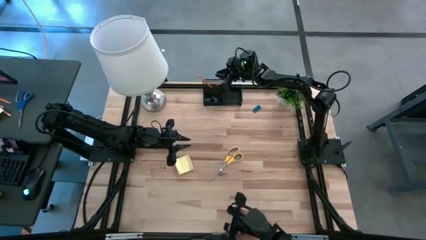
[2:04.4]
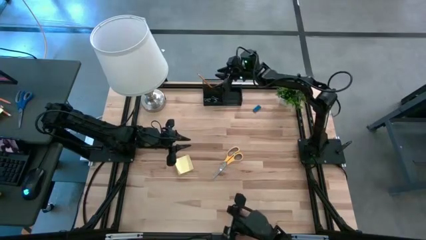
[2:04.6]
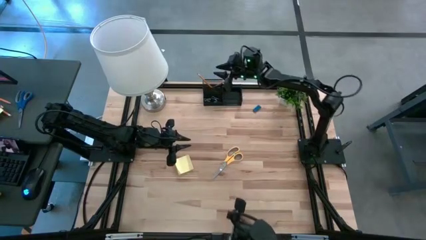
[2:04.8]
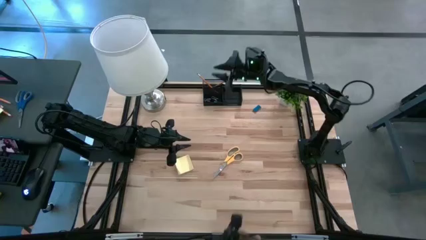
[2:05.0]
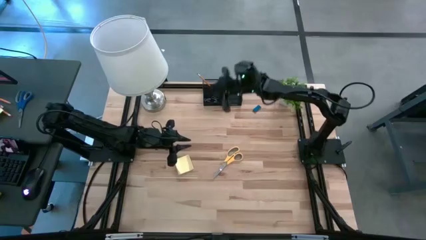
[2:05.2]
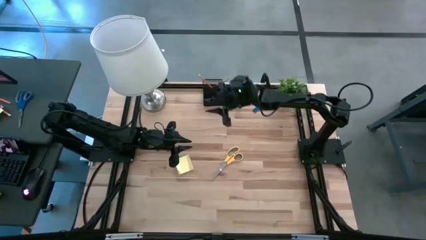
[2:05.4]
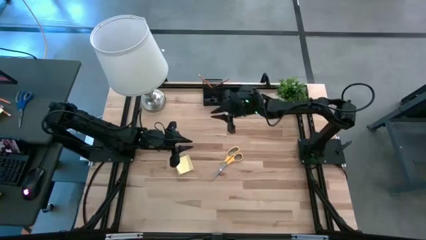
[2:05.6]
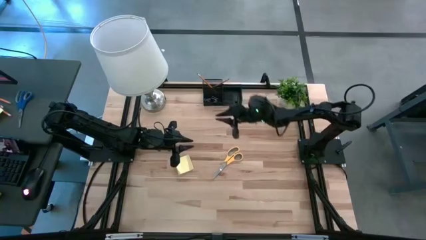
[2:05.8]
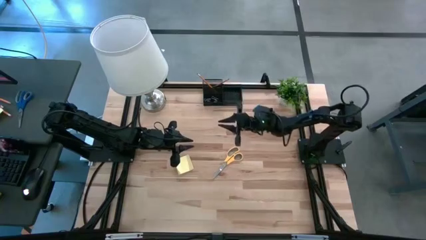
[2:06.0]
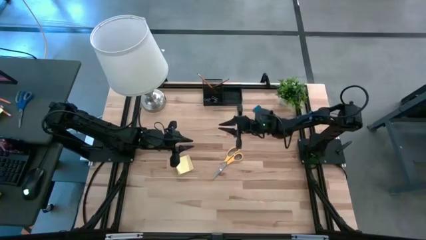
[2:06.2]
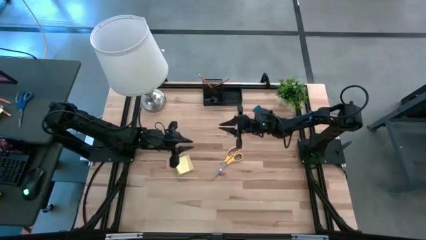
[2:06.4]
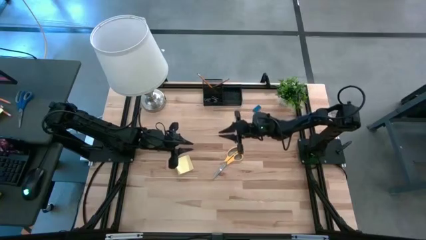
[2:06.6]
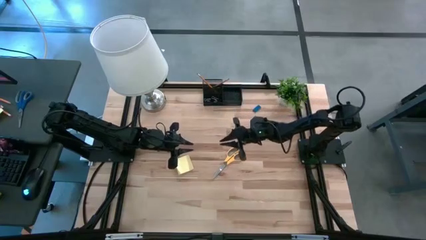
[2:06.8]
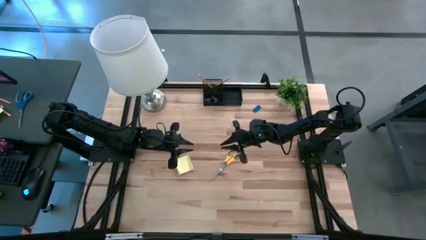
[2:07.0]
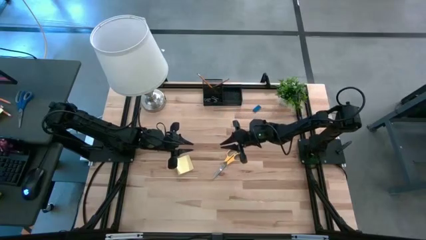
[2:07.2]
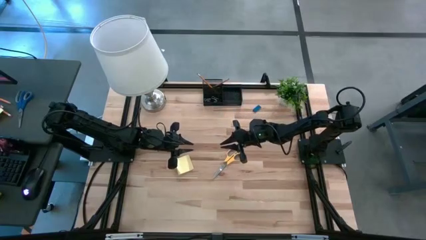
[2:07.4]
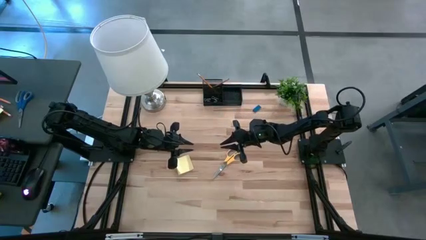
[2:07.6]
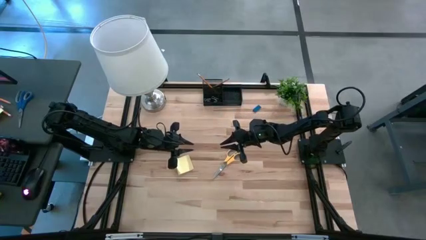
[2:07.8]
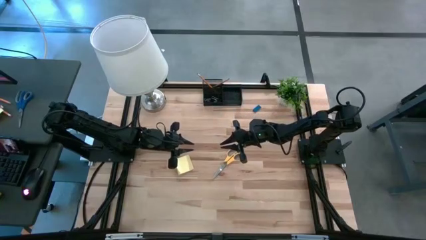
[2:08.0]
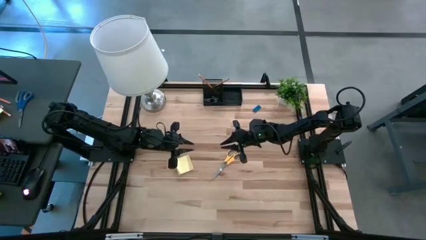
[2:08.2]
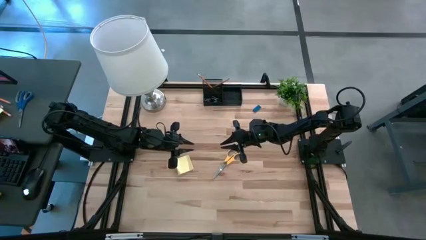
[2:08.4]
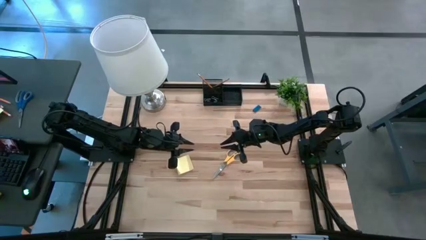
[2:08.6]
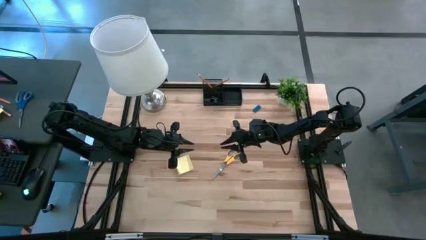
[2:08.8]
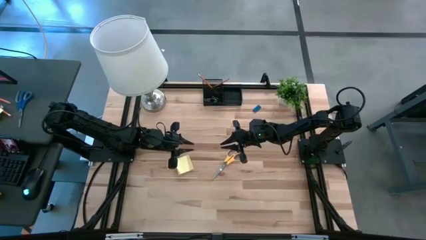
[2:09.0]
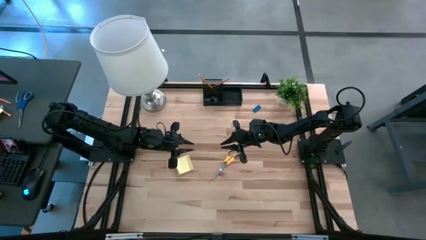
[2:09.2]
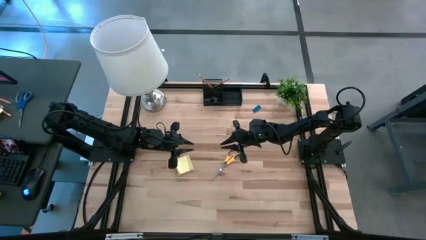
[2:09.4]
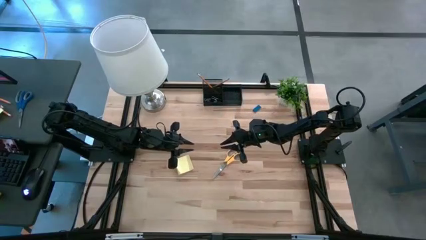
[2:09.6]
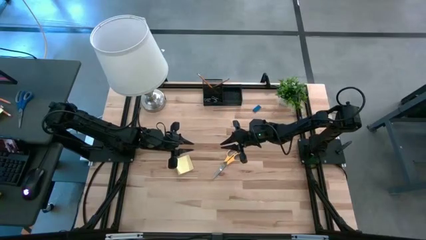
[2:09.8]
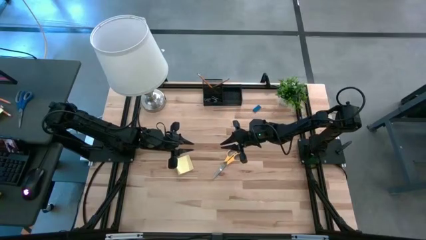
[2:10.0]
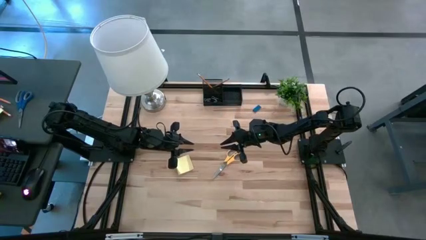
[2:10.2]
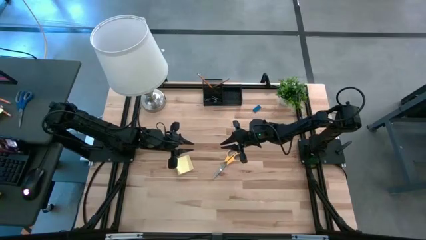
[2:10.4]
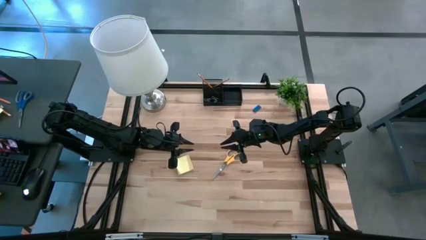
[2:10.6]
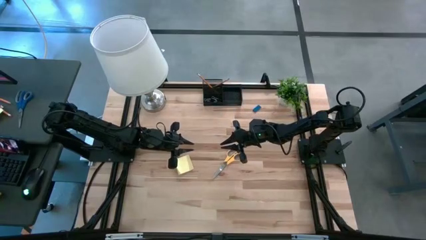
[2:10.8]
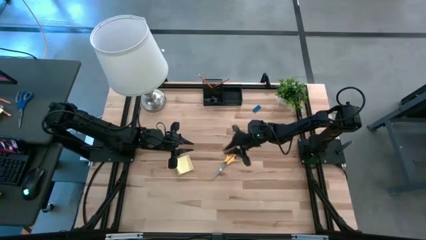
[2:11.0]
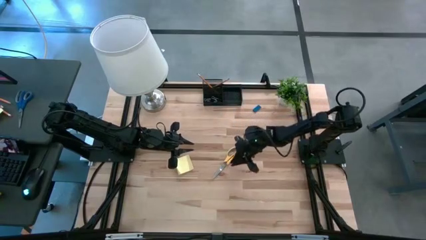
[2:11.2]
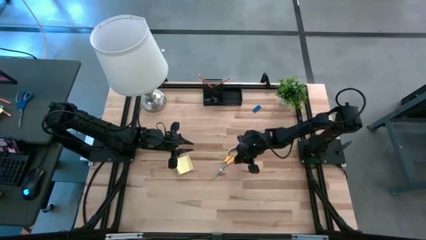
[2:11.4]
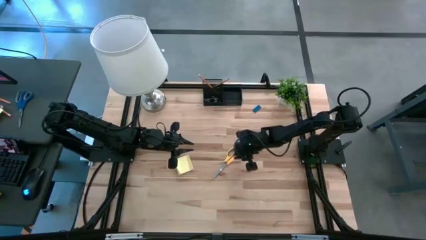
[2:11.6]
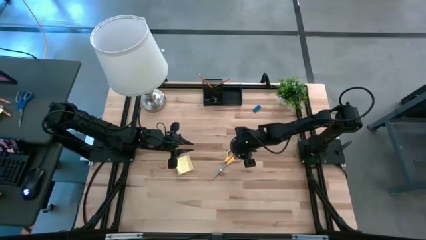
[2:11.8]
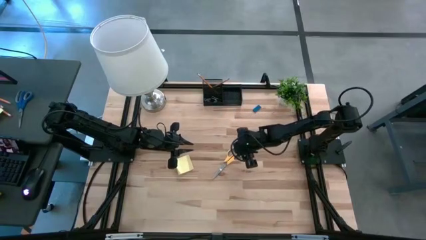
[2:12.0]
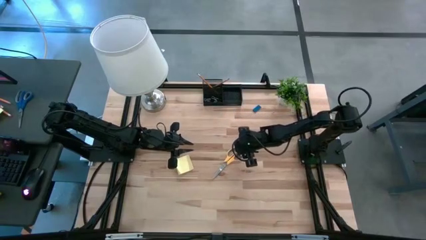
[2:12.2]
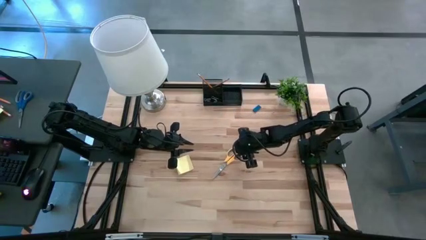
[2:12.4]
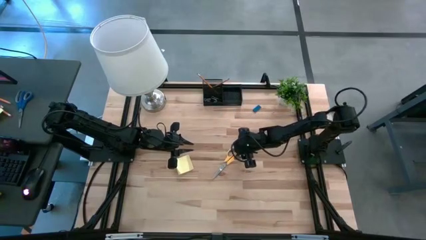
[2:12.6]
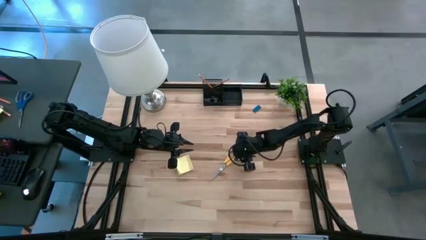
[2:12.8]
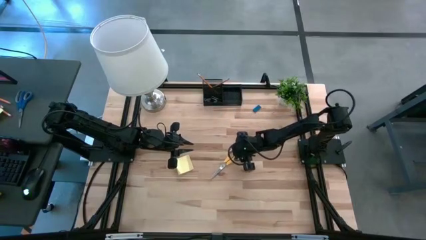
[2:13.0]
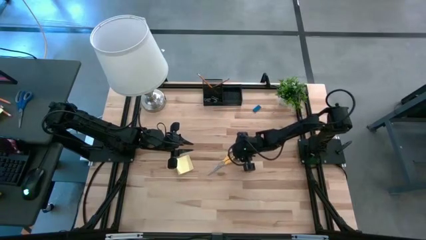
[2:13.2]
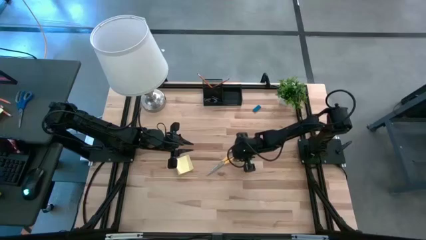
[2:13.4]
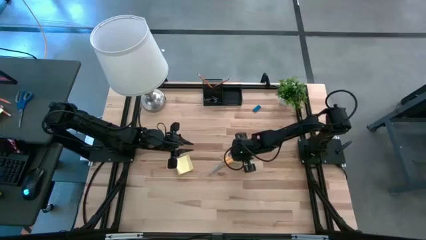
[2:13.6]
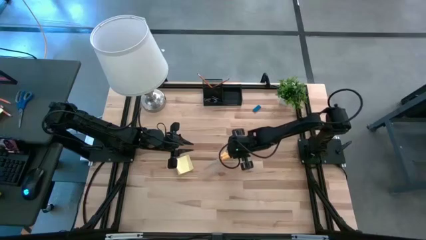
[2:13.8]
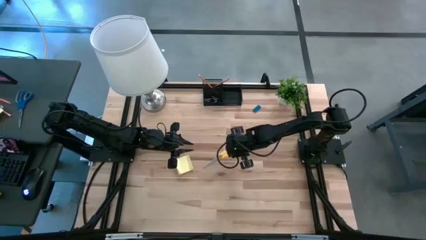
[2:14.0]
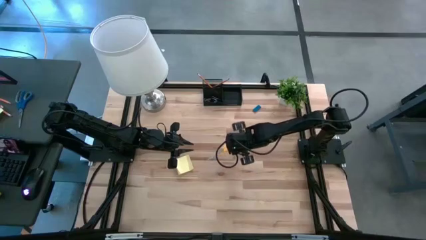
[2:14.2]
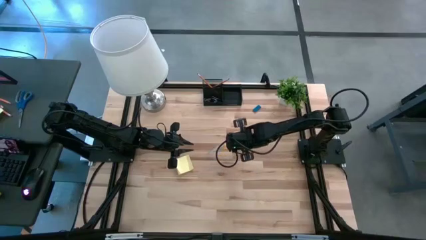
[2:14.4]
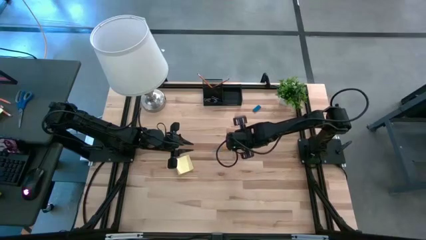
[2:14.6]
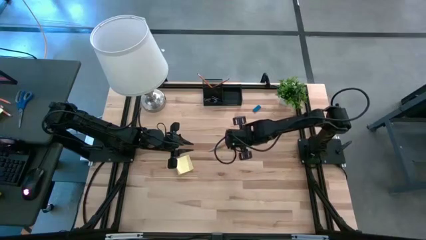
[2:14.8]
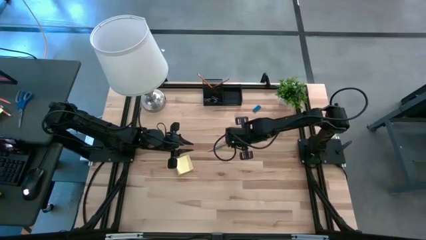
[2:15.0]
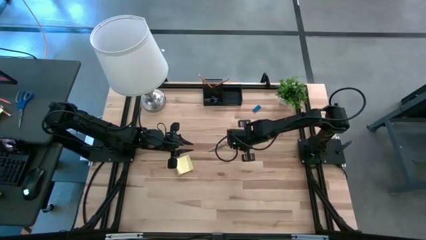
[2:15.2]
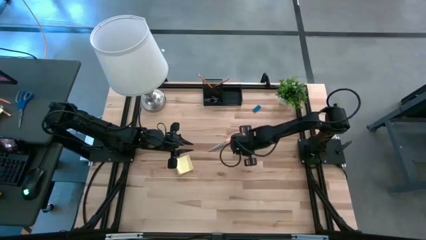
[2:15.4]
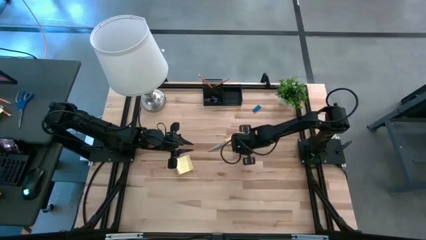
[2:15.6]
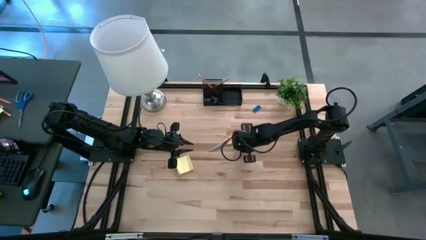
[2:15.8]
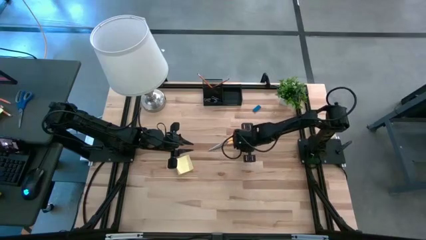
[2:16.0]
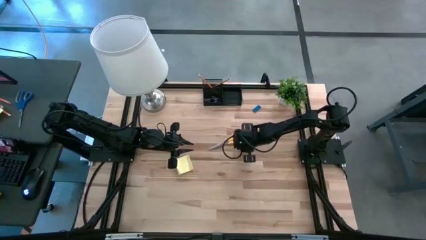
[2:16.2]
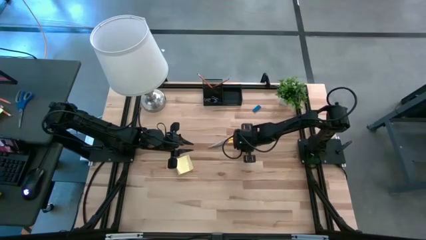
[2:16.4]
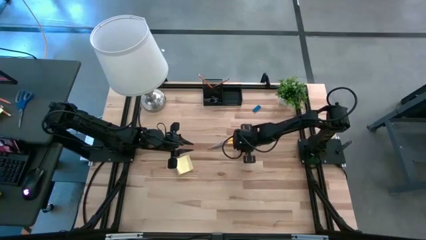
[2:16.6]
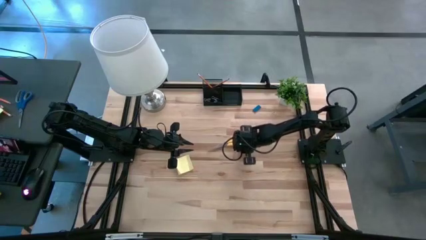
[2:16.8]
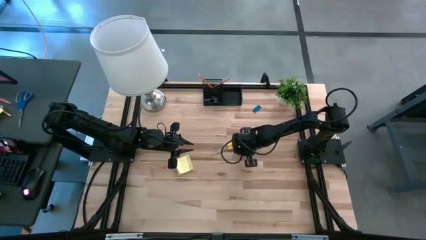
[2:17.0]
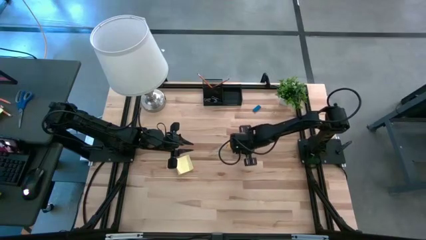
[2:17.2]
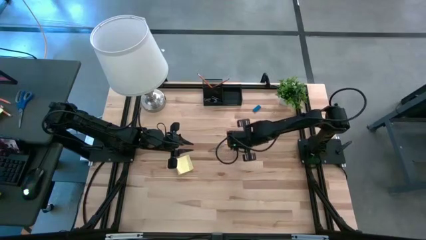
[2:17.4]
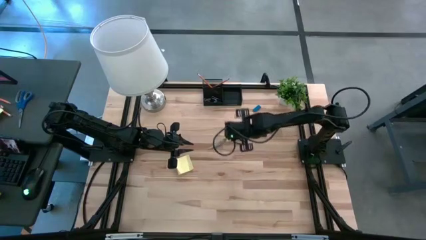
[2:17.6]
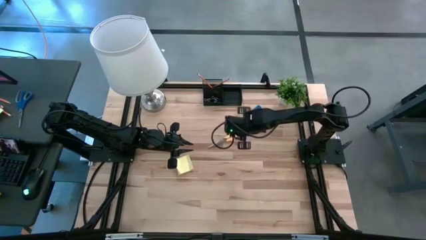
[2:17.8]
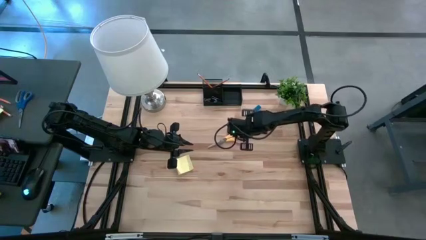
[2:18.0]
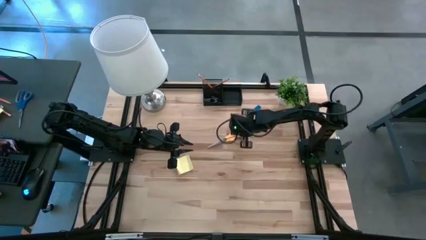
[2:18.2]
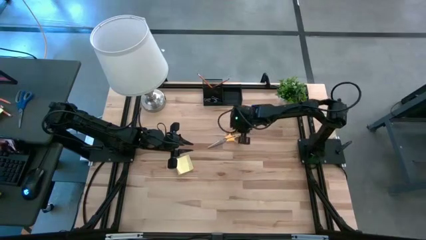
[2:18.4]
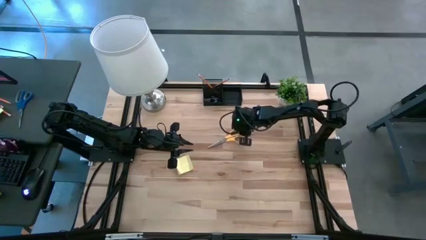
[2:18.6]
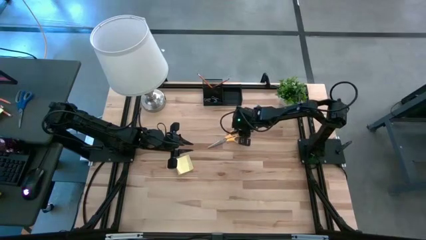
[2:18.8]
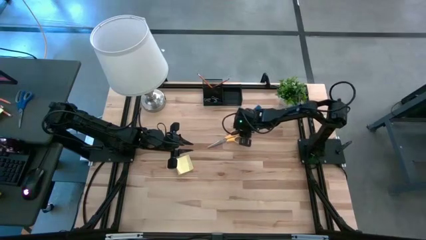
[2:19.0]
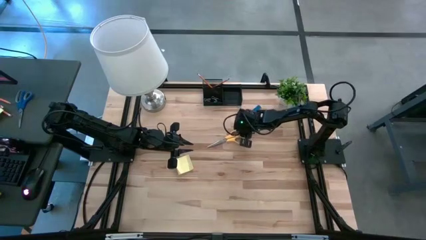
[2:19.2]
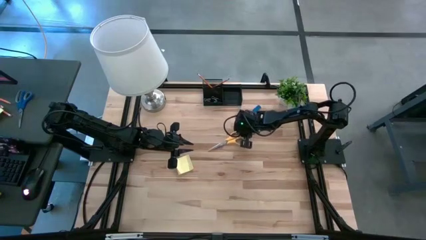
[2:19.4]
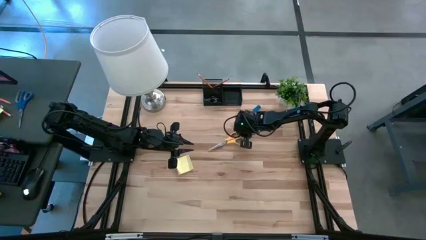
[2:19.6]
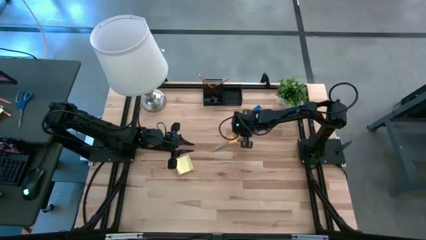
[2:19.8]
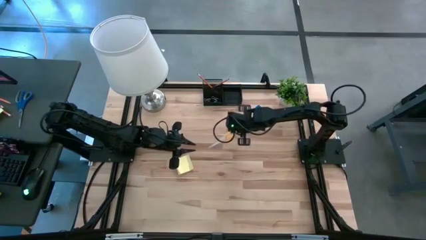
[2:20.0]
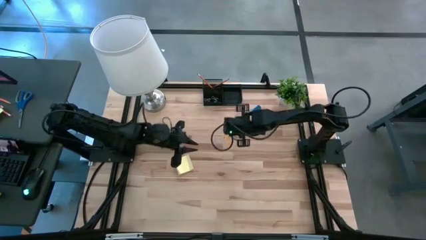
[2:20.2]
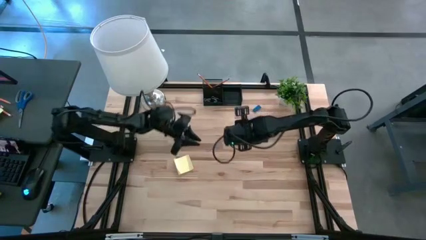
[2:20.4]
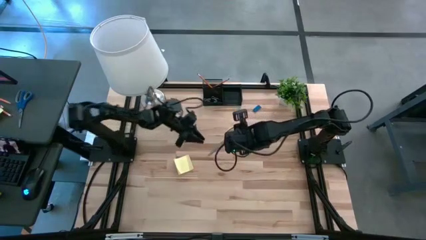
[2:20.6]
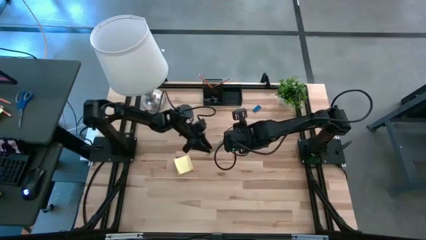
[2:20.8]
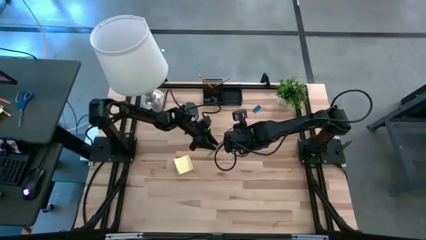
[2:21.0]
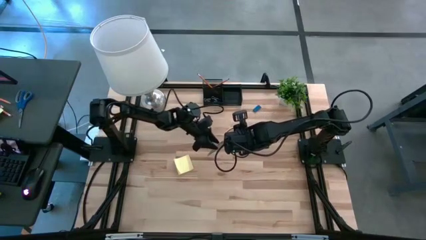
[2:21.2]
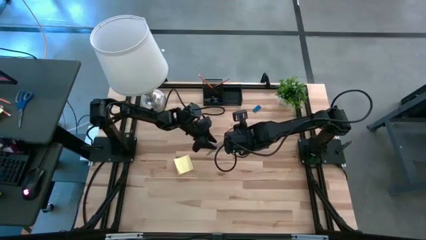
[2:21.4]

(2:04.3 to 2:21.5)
Task: Pick and place office supplies into organizer
Put the scissors into the desk organizer
